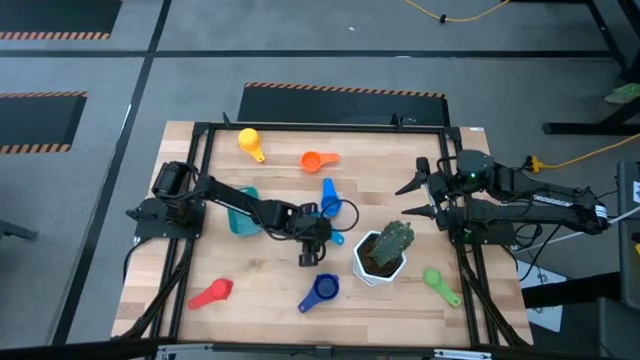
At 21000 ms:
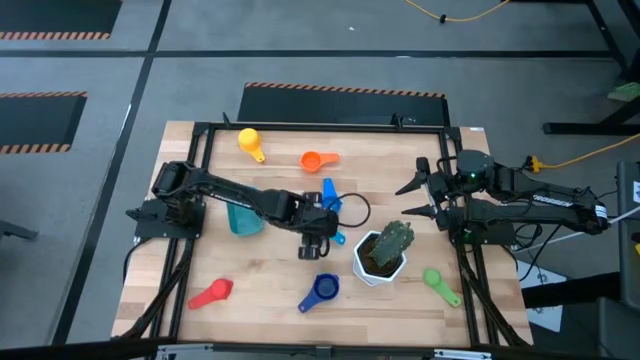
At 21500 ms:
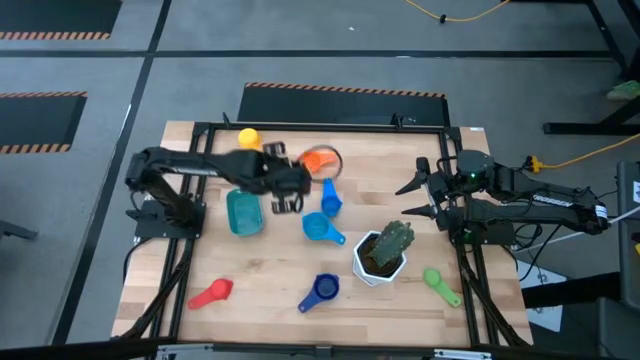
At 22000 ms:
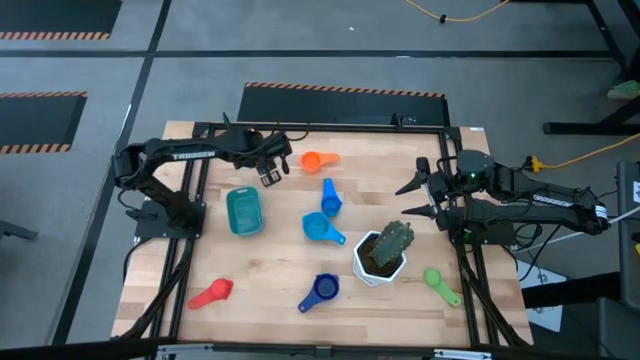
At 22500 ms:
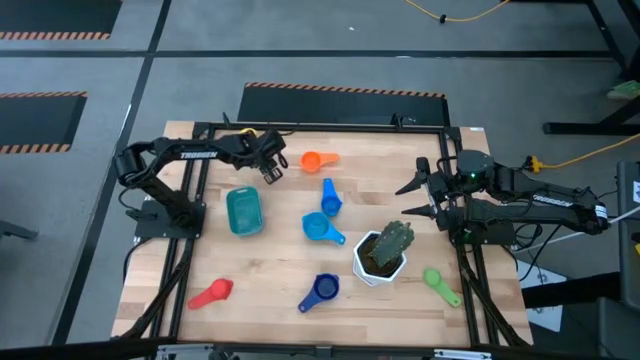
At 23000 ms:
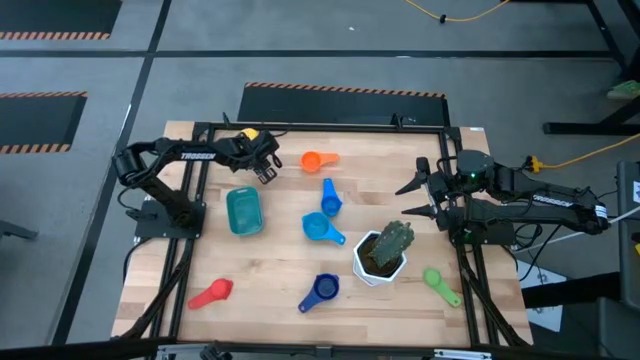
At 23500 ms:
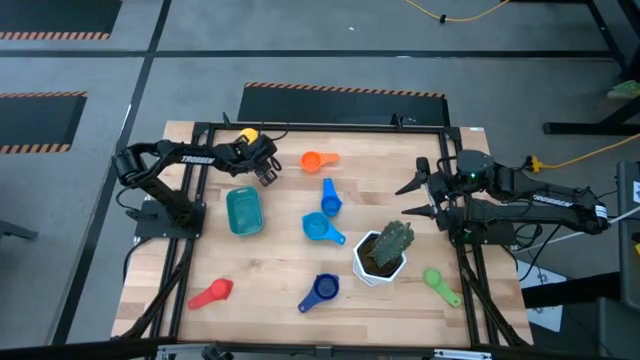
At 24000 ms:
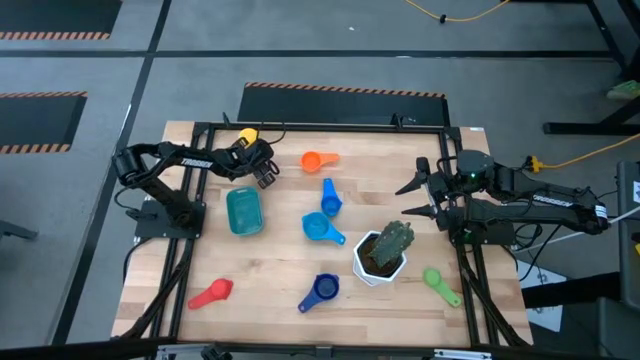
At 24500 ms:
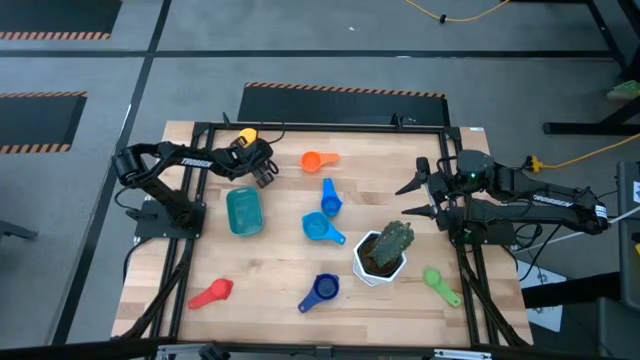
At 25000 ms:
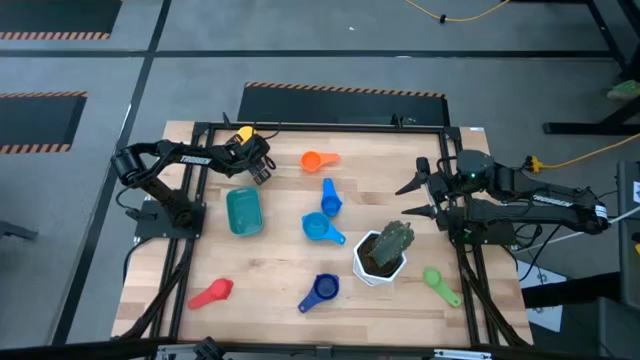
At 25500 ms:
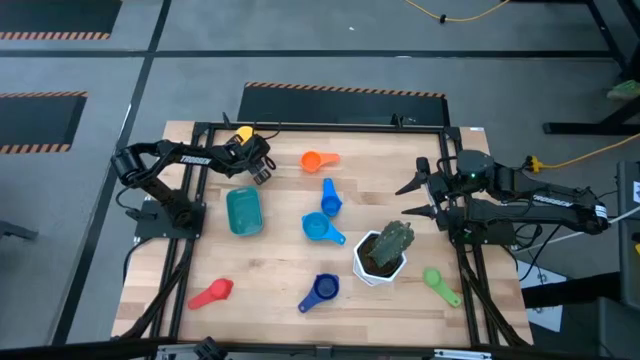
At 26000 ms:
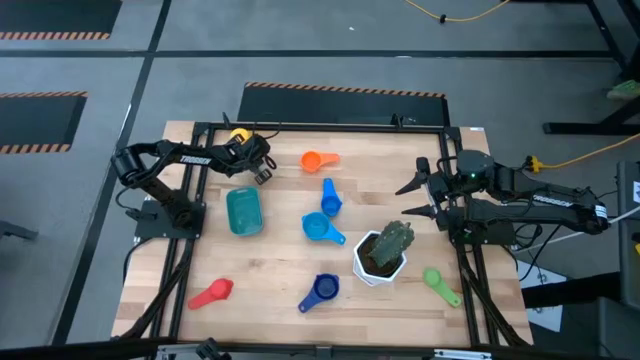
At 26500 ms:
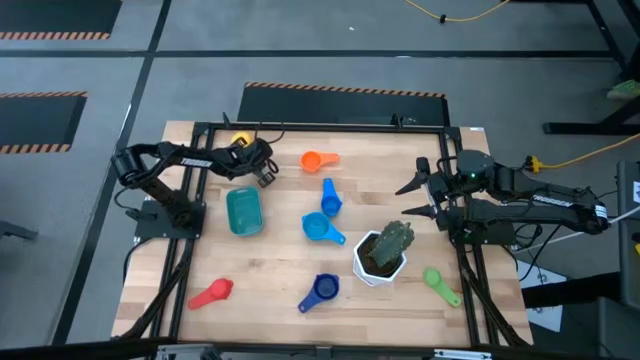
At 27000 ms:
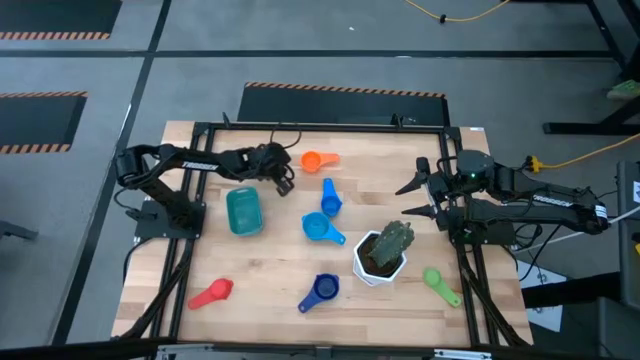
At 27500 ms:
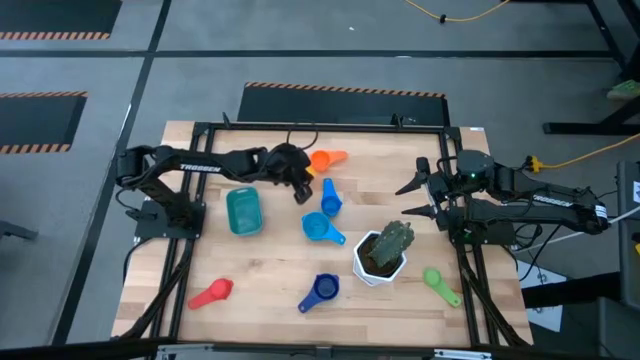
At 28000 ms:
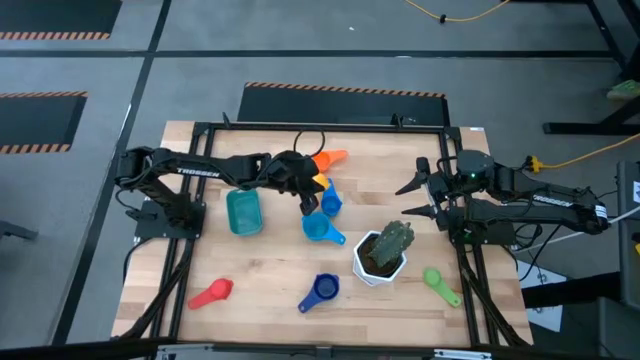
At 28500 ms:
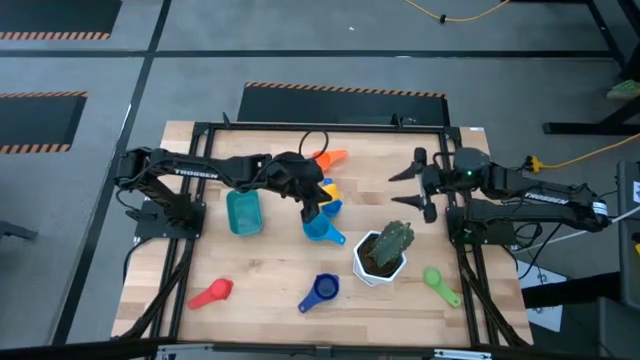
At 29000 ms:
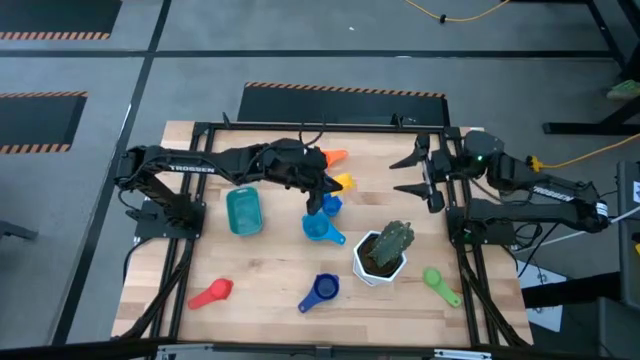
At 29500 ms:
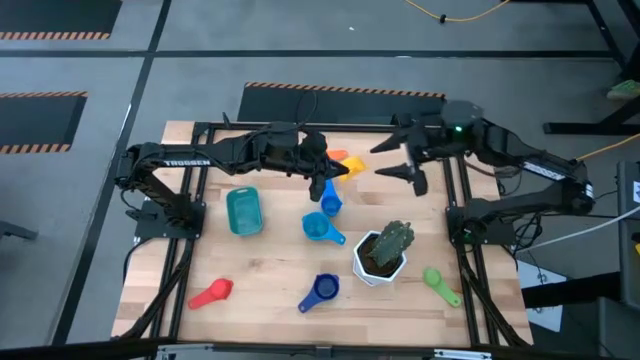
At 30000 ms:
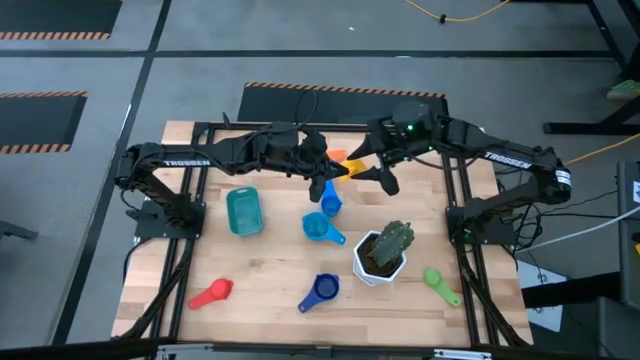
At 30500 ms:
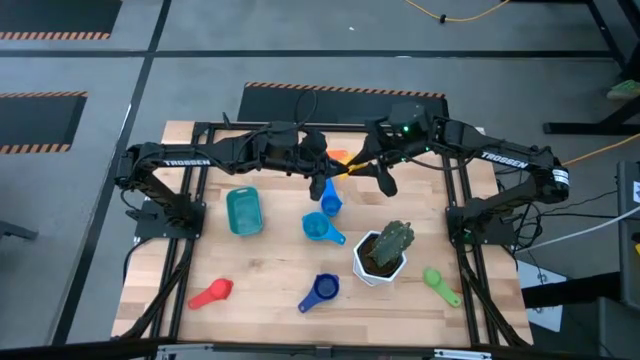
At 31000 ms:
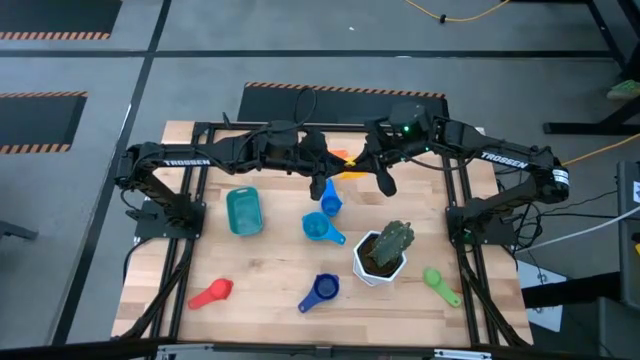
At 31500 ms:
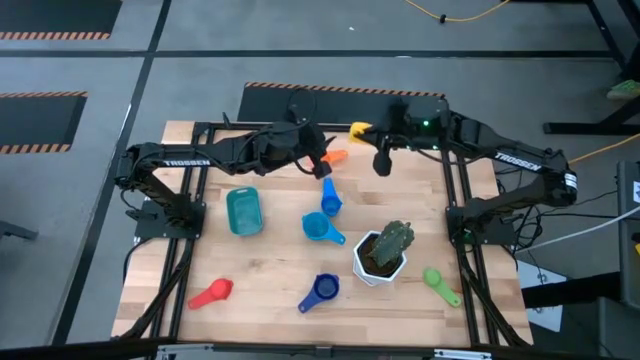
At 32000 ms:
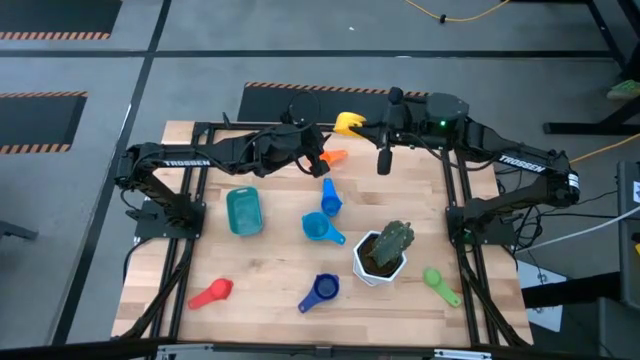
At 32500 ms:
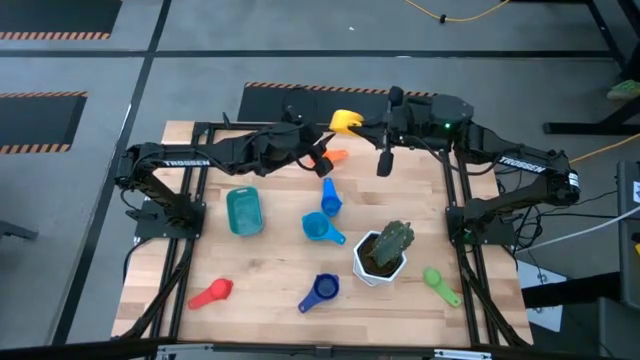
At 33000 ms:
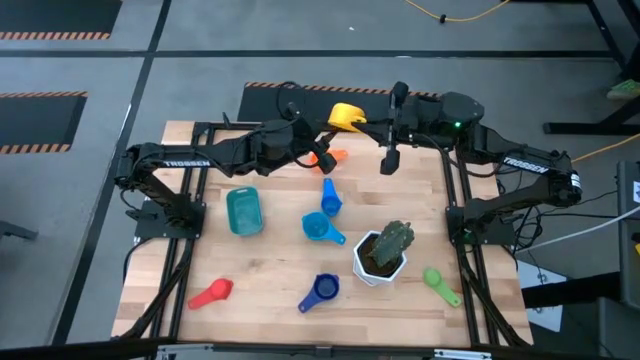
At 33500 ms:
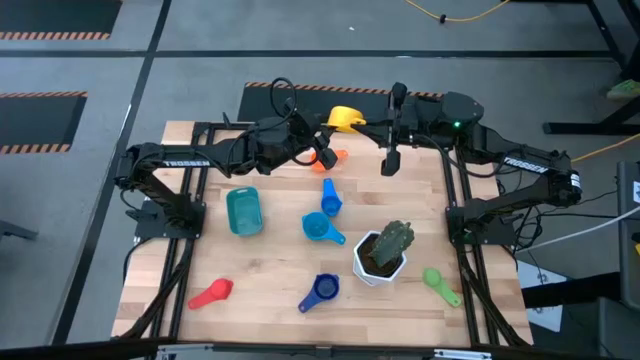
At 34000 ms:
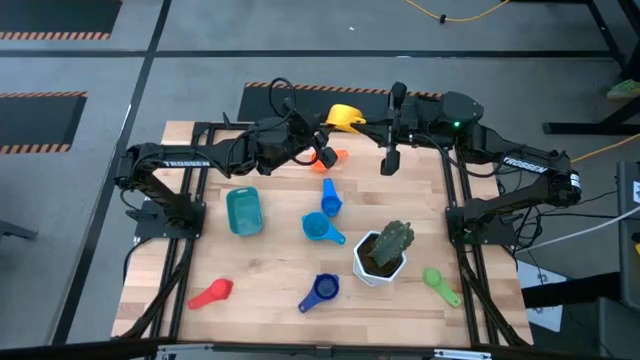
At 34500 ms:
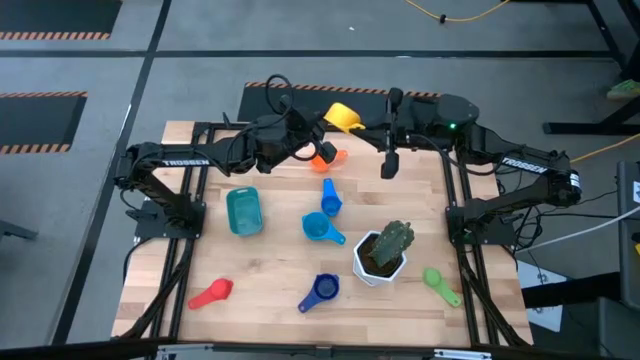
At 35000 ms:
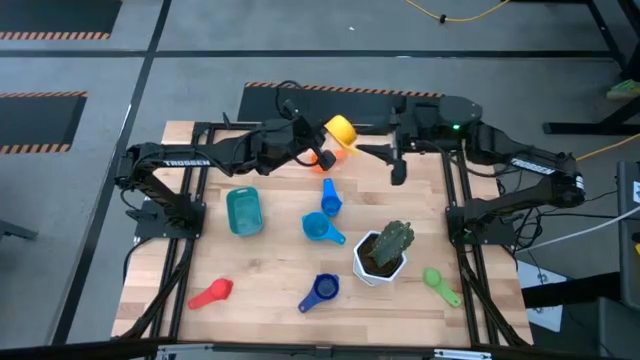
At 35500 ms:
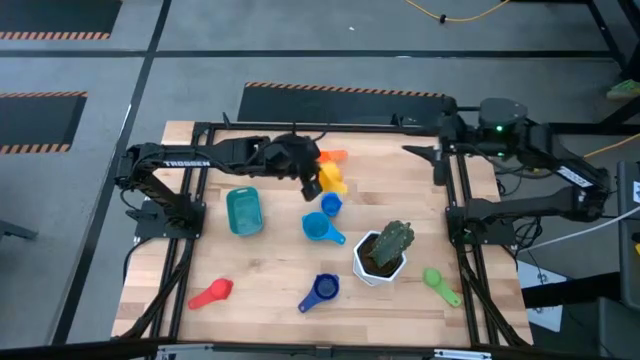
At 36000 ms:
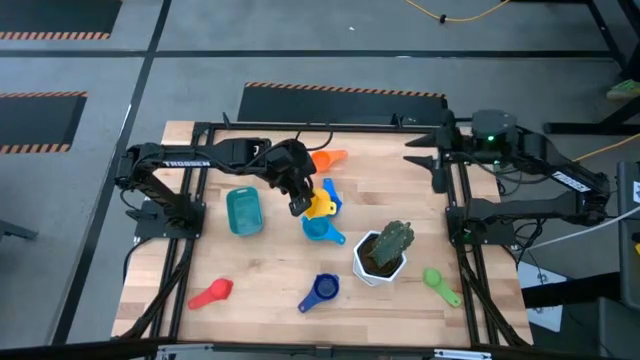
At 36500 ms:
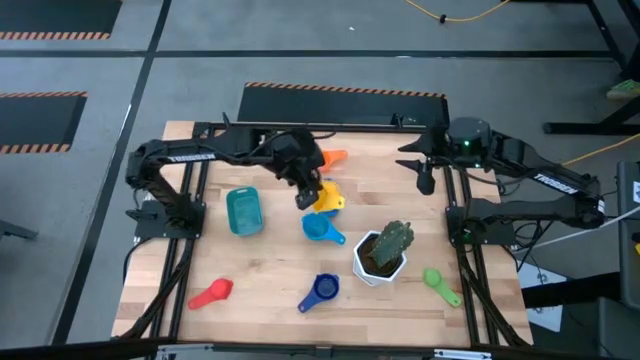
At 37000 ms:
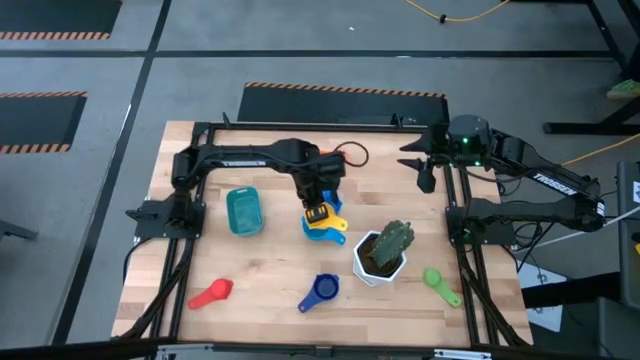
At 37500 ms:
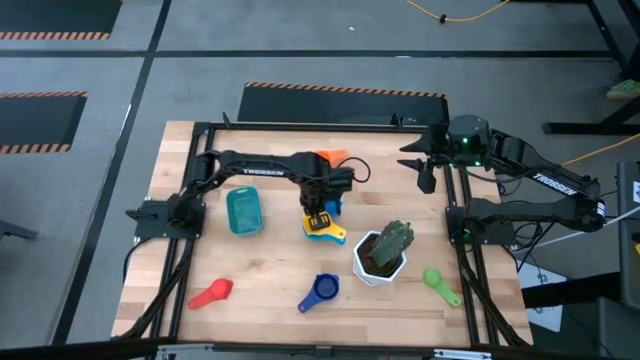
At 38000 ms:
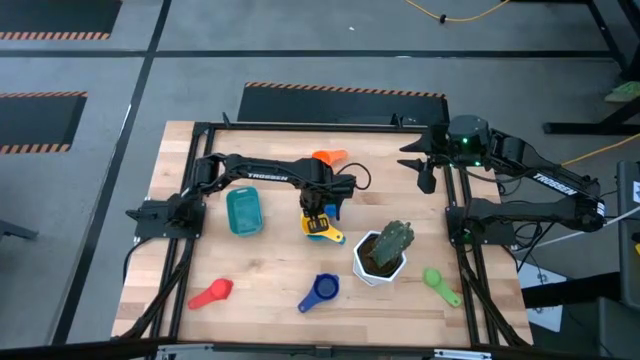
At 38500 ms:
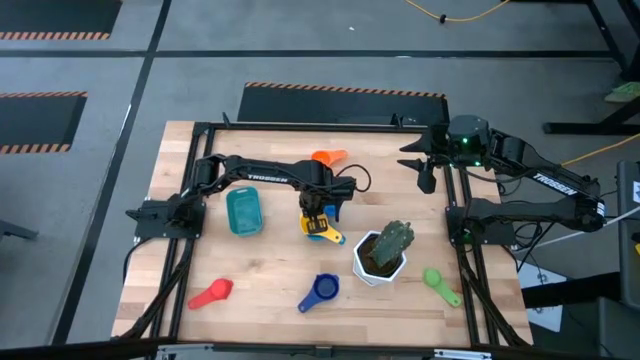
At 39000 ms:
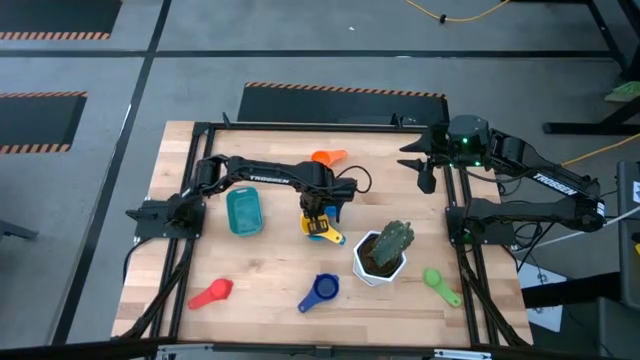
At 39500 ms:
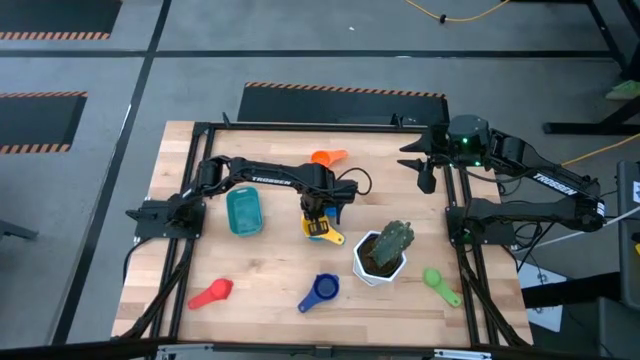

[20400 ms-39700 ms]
Task: Nest measuring cups in basket
Stack the yellow measuring cup on top of the light blue measuring cup

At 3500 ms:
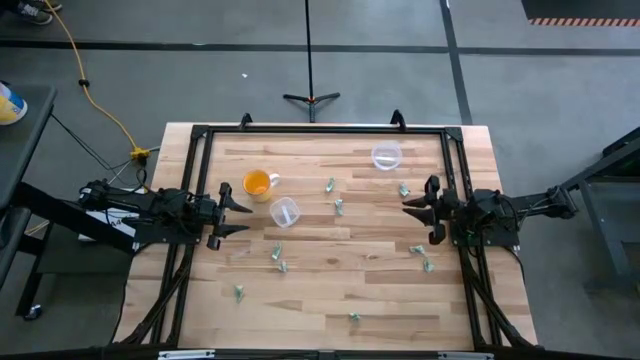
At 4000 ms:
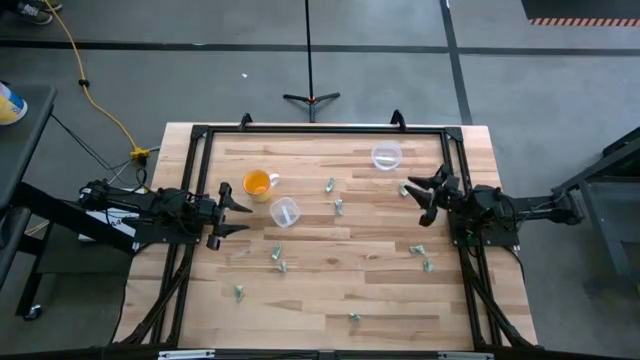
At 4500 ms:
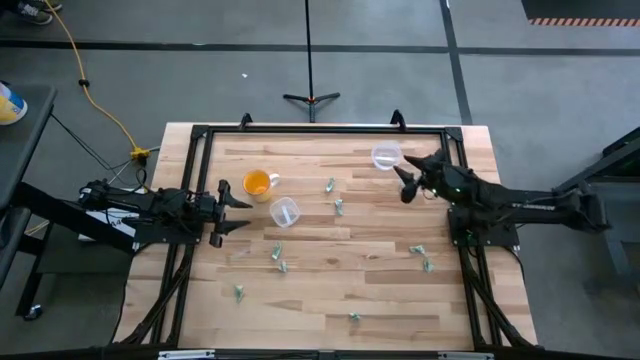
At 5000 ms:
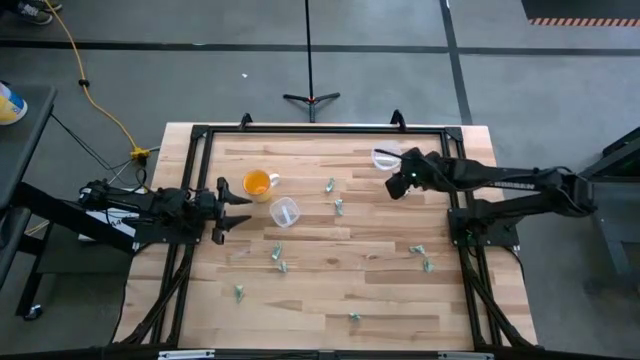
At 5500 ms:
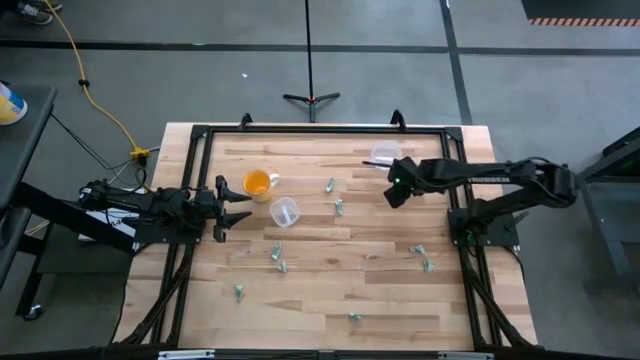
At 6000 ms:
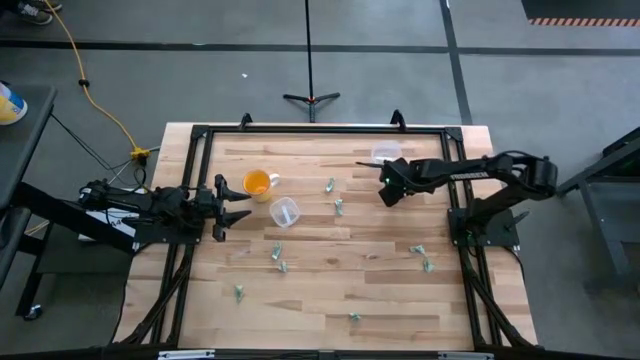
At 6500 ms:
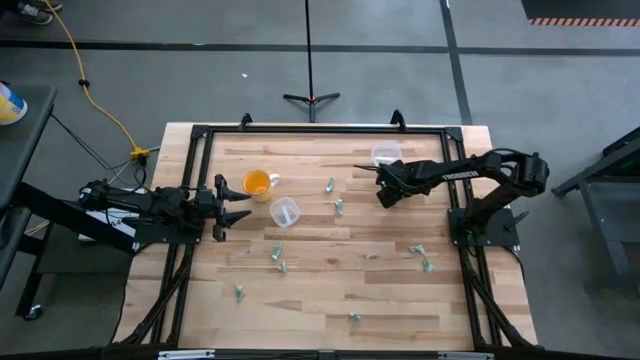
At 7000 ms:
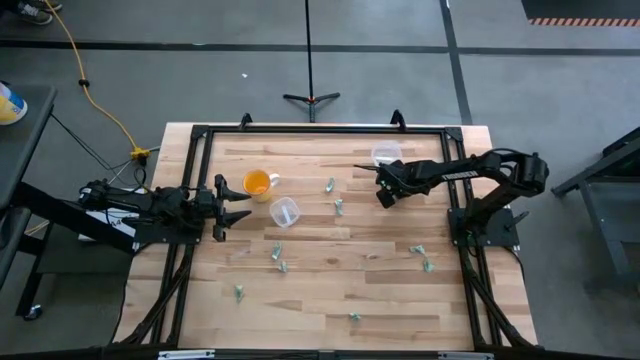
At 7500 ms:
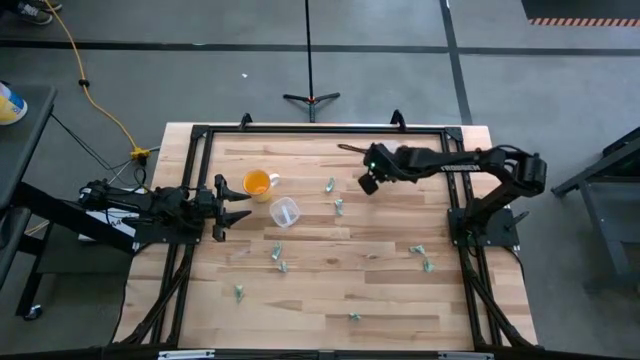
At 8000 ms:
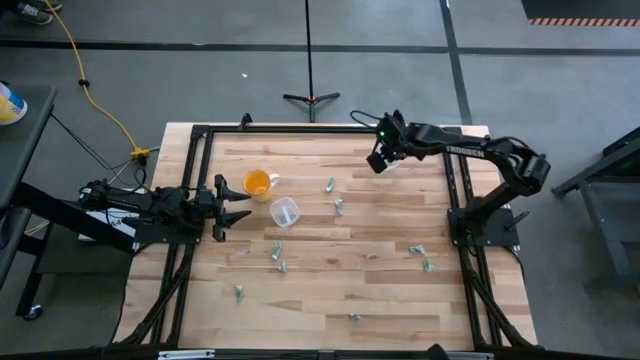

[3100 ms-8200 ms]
Task: Pick and place Stevia / Truvia into bins
Put the stevia packet into the top transparent container
